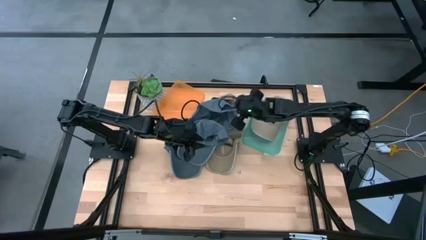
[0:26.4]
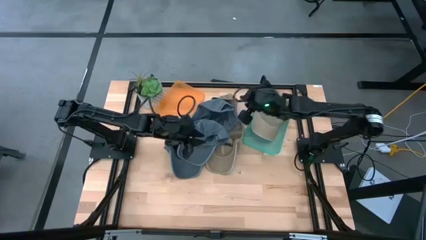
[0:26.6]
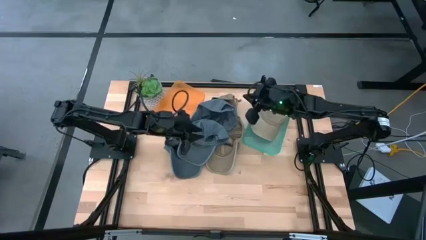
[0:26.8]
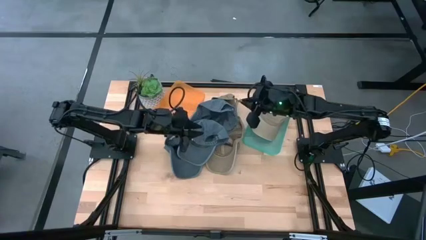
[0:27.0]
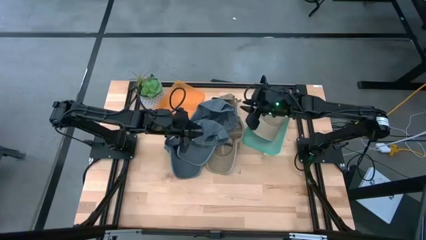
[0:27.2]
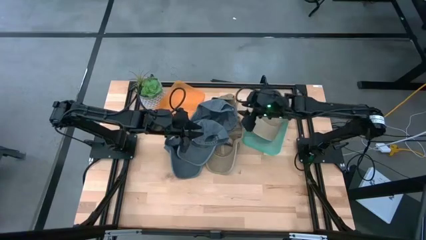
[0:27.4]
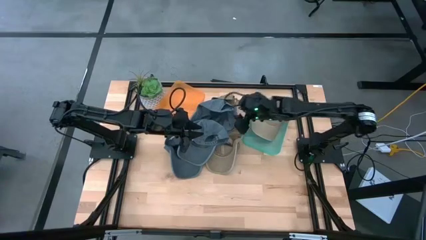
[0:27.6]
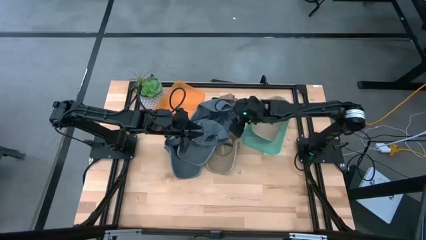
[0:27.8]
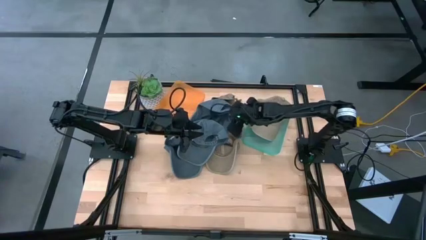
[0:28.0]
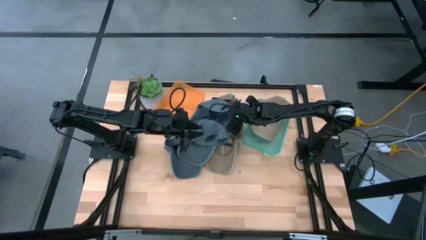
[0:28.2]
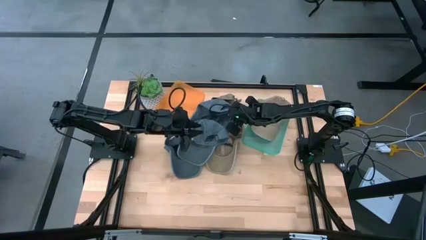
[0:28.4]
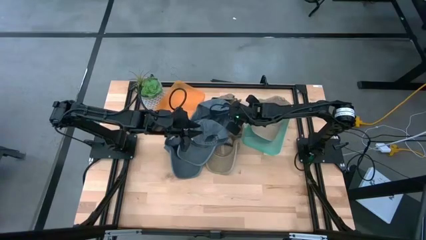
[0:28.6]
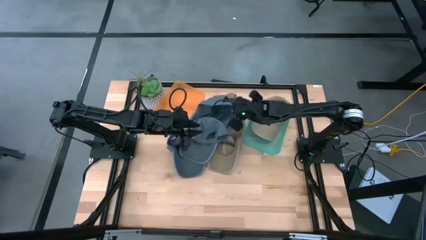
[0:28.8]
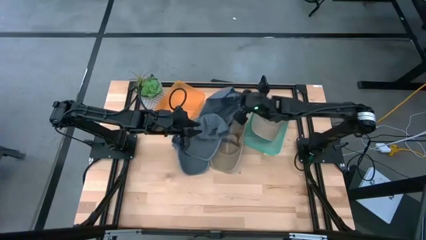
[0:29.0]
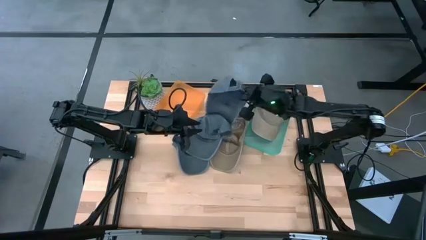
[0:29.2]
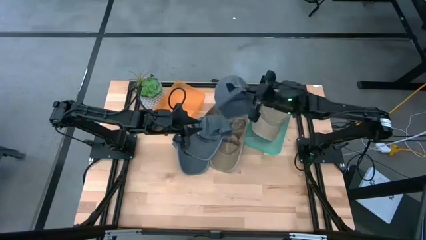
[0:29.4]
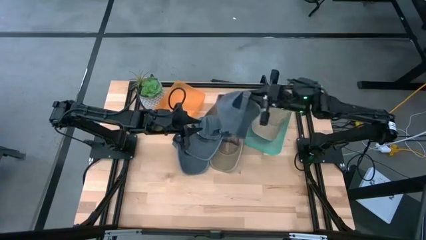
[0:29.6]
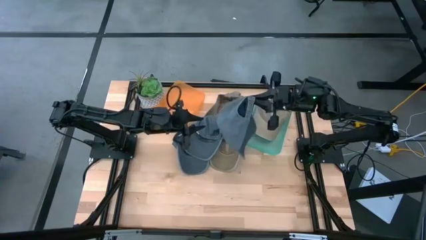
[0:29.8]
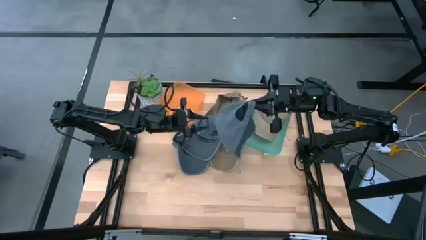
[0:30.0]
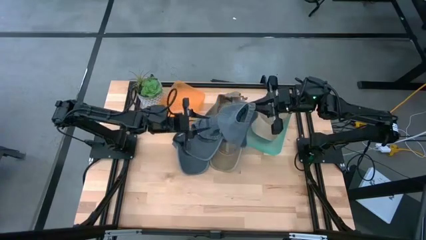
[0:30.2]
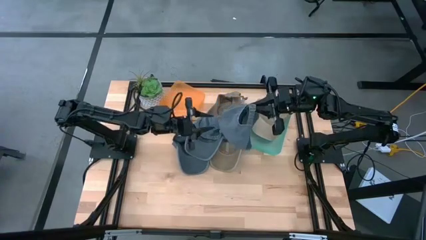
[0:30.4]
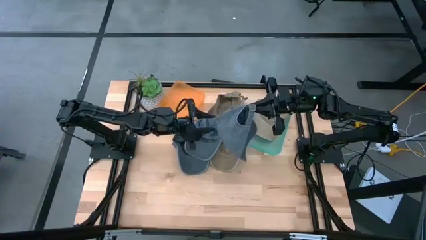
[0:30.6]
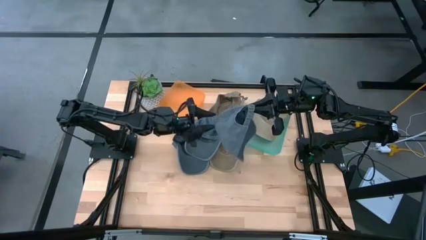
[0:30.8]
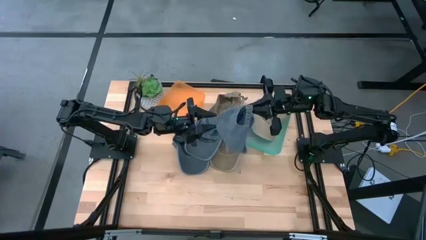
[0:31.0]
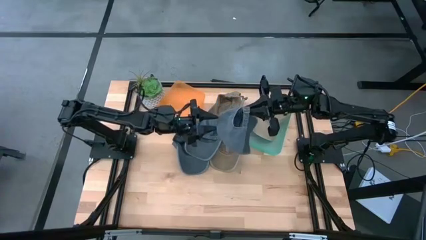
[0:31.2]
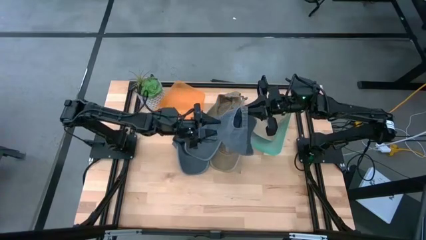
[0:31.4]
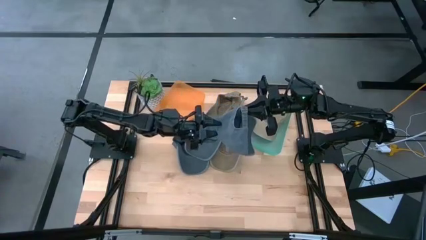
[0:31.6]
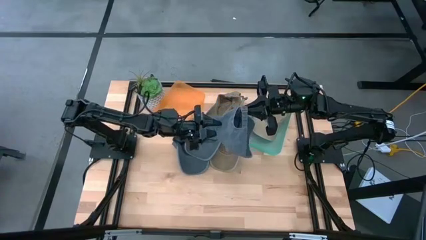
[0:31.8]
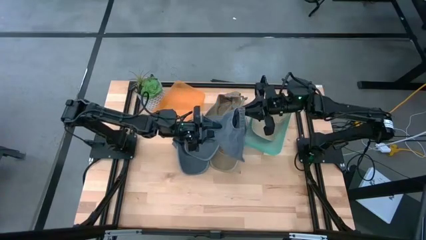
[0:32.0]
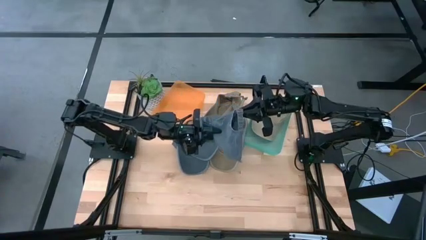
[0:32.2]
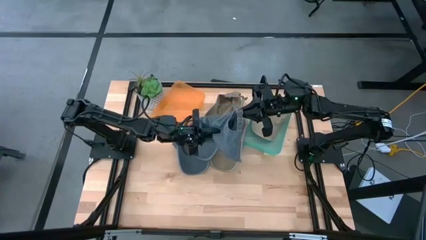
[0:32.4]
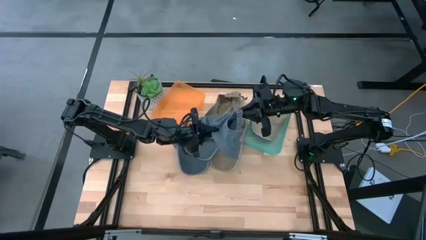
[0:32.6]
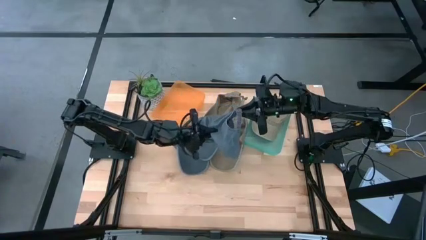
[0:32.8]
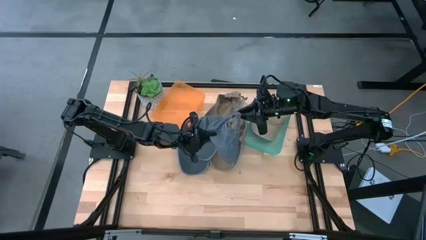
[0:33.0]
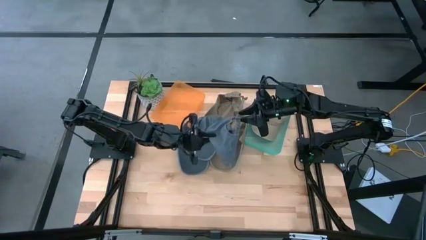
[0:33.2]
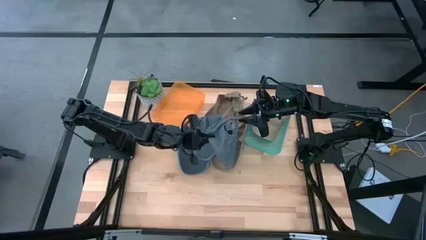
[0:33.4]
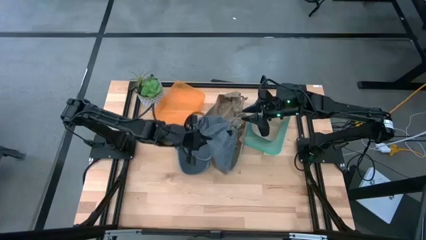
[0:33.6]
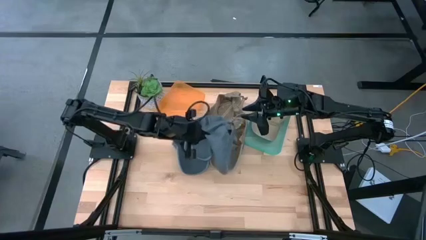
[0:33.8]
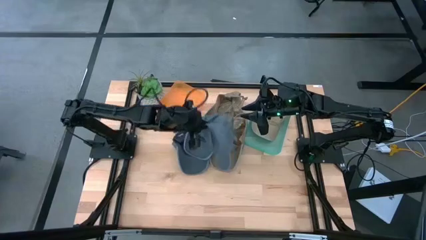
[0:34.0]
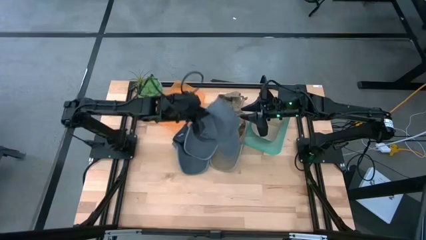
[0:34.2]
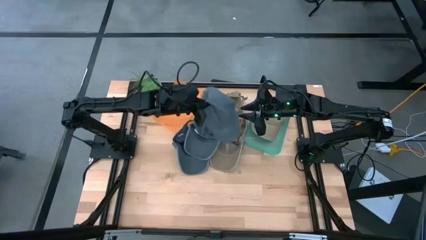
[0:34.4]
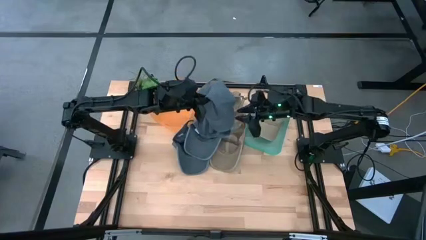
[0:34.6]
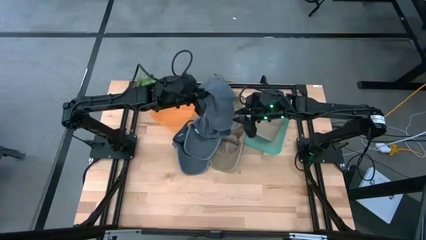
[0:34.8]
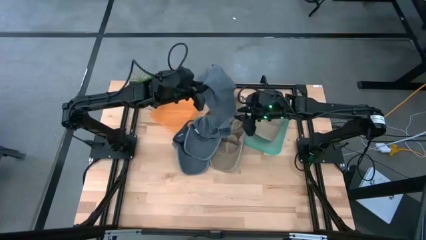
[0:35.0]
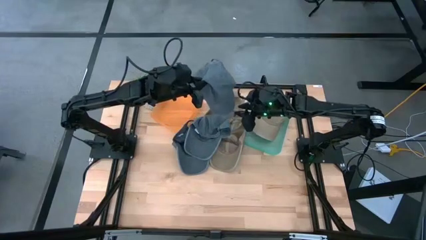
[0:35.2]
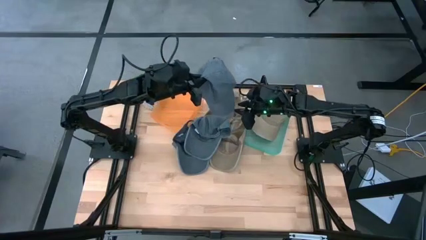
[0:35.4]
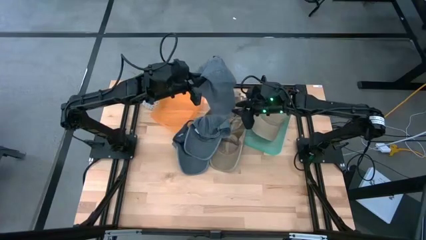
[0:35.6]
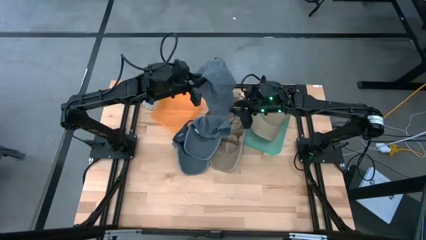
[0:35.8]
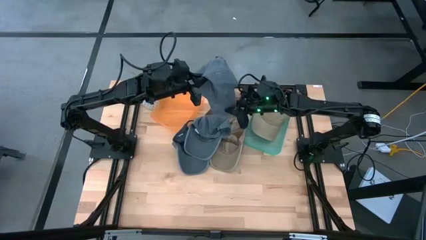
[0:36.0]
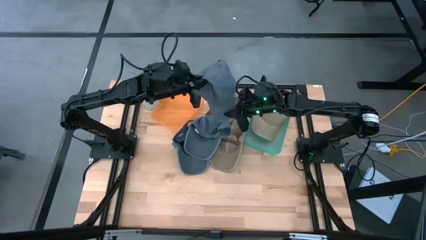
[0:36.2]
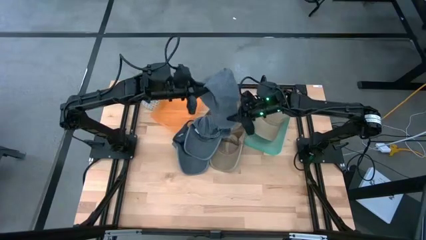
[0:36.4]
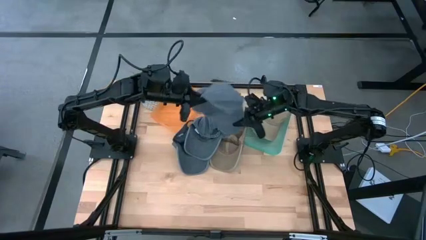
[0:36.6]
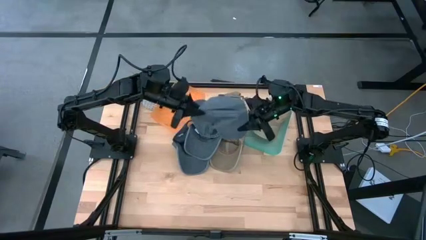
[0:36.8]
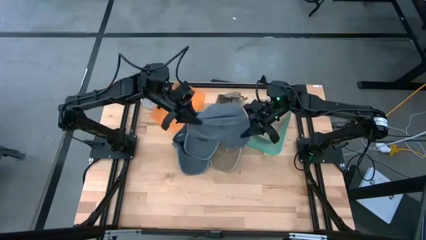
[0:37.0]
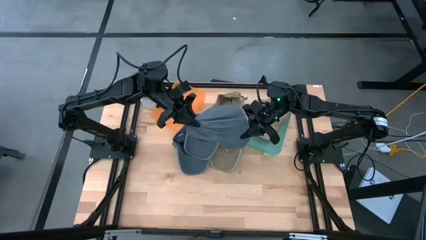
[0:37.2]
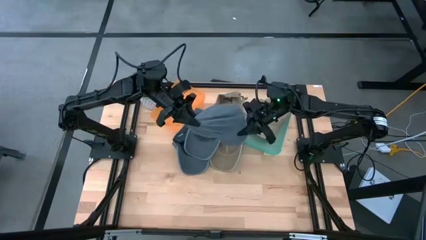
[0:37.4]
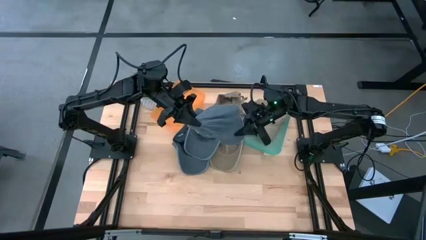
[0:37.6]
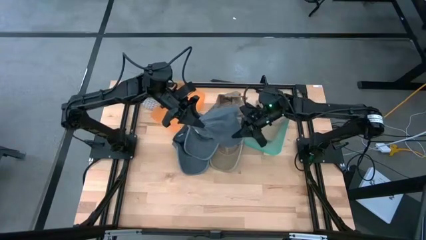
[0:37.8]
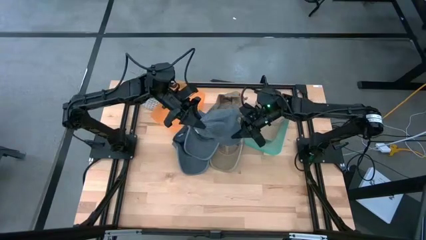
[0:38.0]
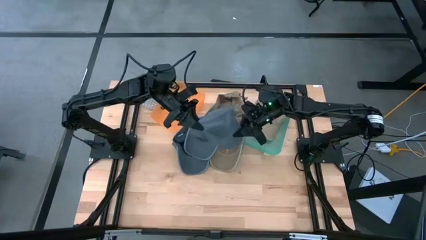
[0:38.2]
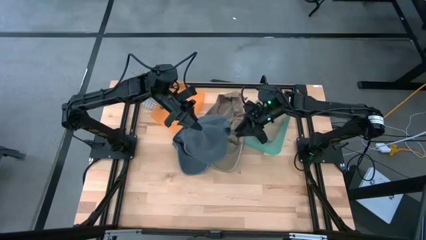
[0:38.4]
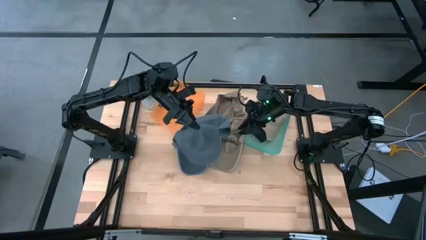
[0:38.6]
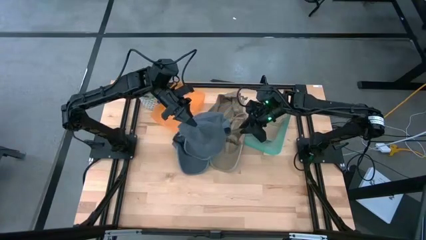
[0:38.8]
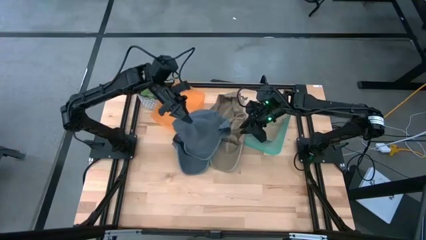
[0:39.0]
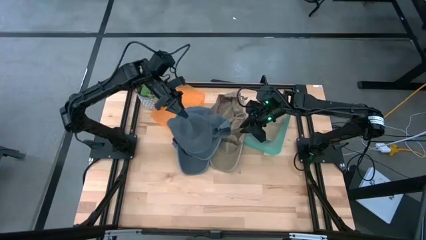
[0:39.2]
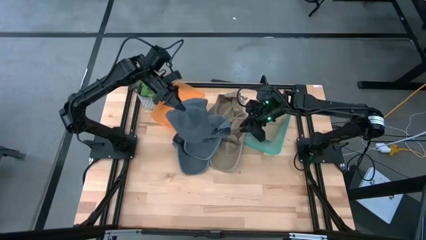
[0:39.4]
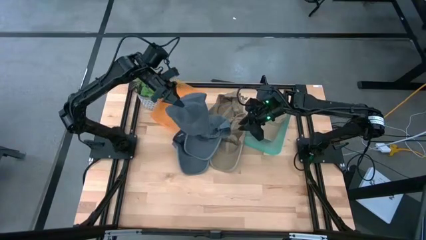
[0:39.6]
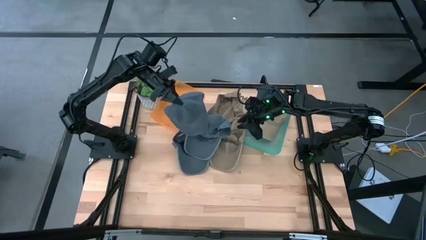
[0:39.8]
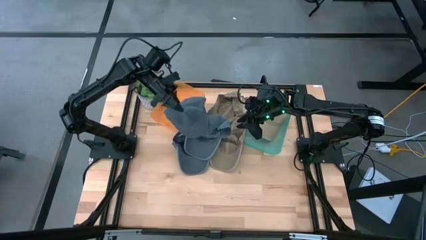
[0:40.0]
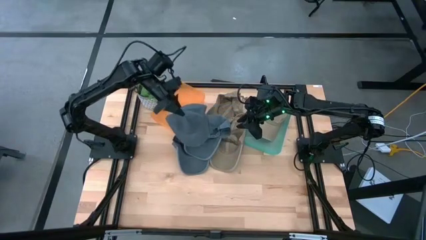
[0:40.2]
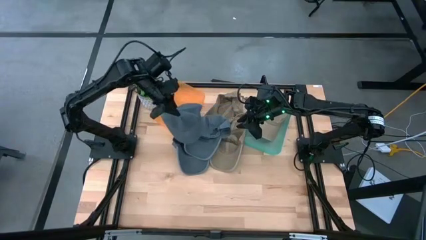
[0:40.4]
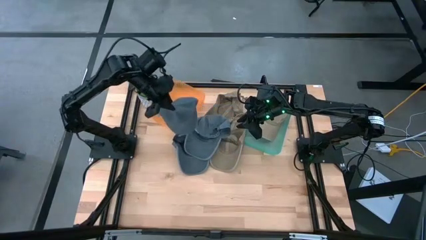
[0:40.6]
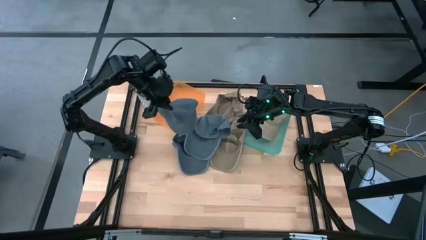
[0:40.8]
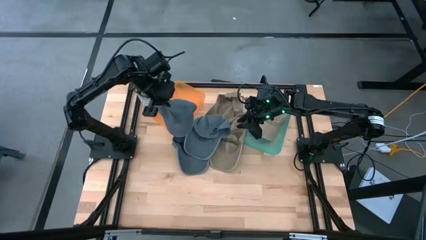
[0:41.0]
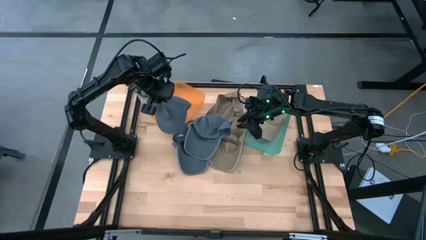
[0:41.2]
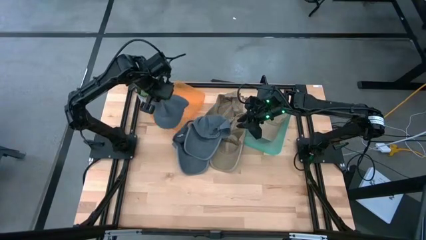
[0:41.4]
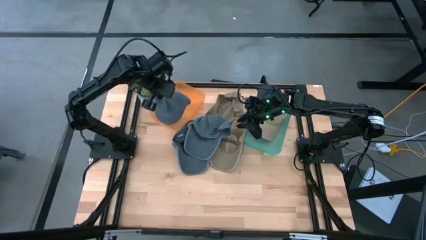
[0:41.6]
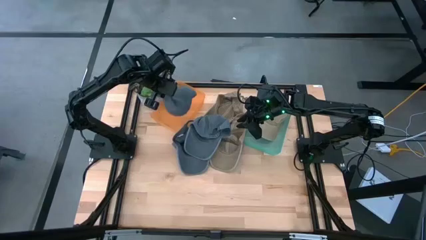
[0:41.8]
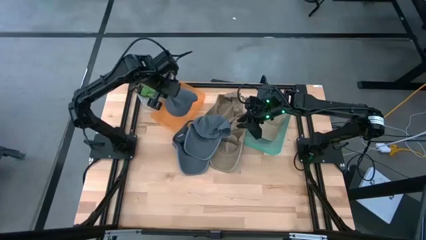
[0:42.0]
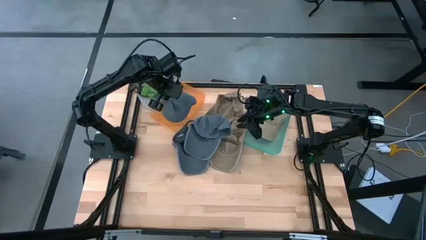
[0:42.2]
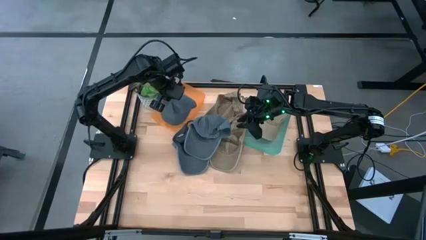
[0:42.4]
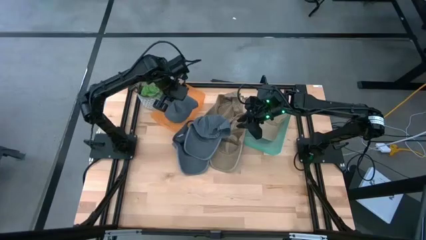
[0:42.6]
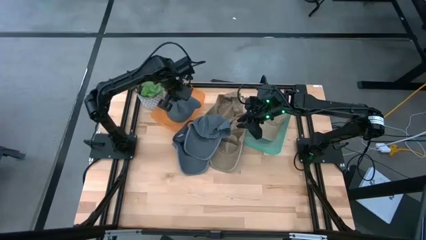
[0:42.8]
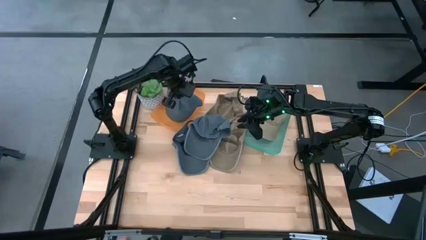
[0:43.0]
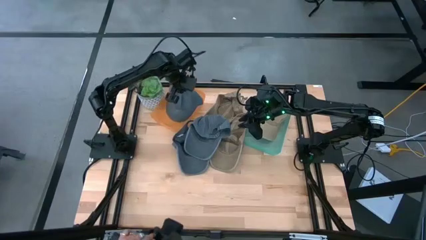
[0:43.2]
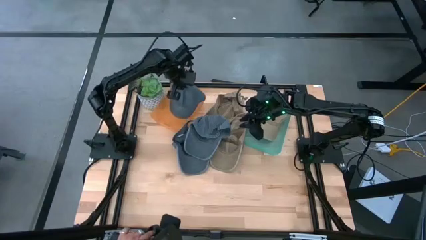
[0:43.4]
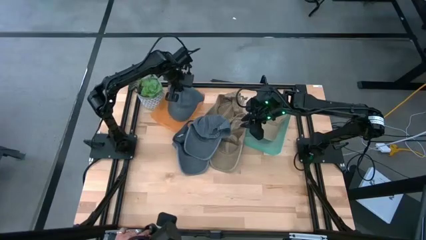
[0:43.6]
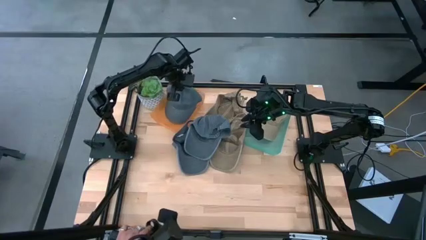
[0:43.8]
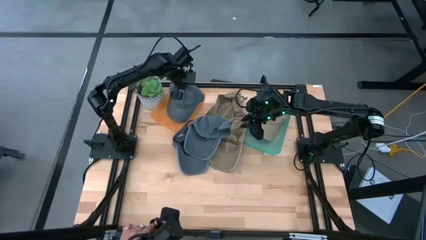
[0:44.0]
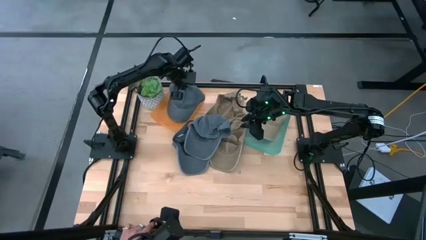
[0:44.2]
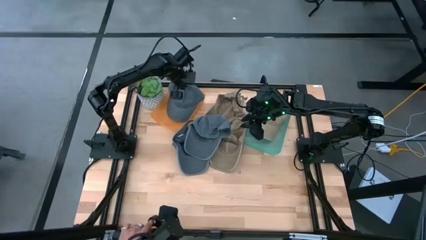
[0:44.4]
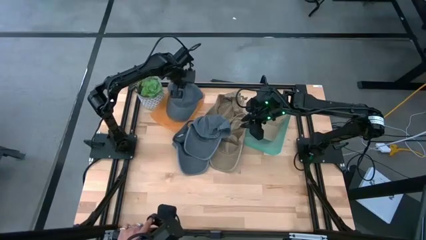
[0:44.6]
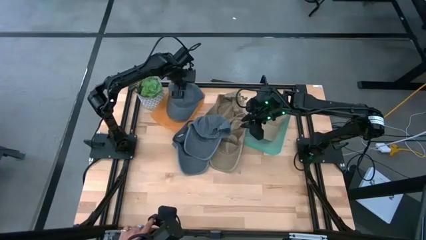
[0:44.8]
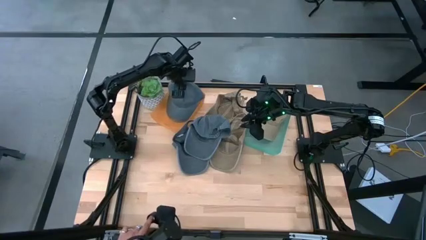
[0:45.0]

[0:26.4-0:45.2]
Task: Pick & Place hat
Put the gray cap into the orange bin
